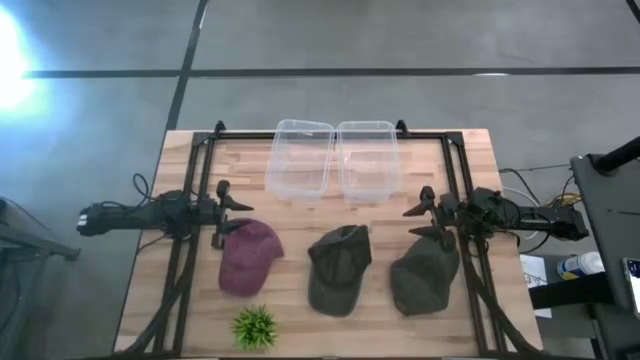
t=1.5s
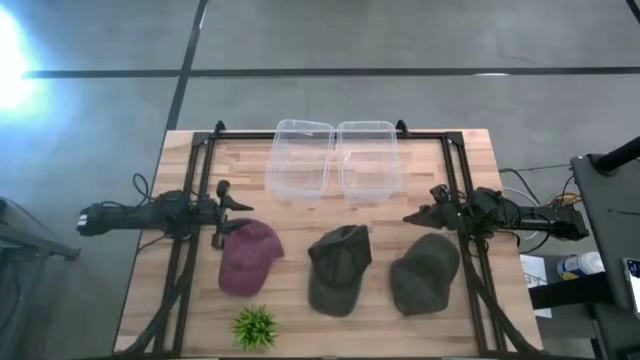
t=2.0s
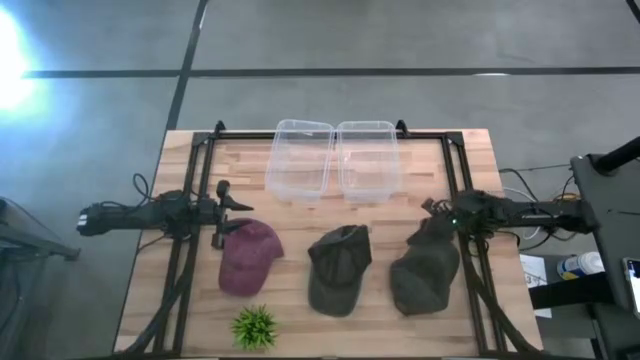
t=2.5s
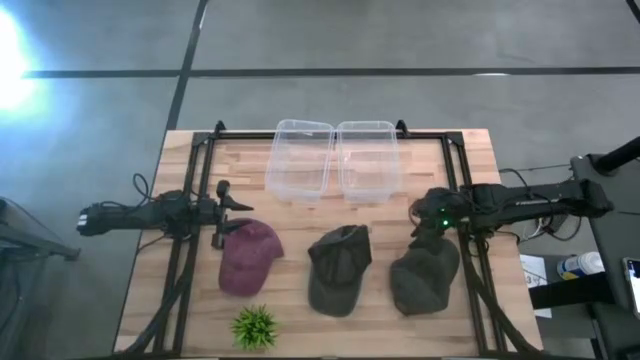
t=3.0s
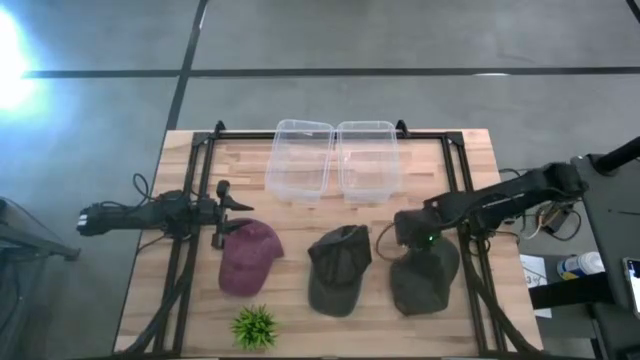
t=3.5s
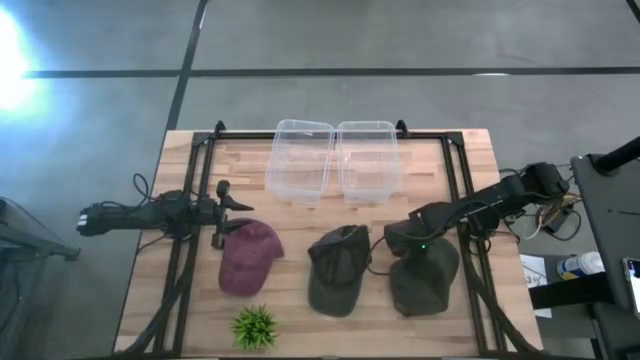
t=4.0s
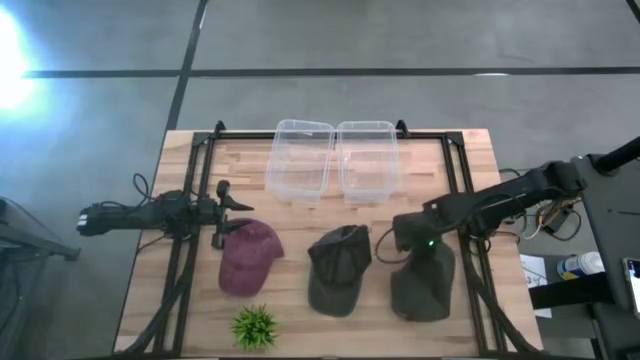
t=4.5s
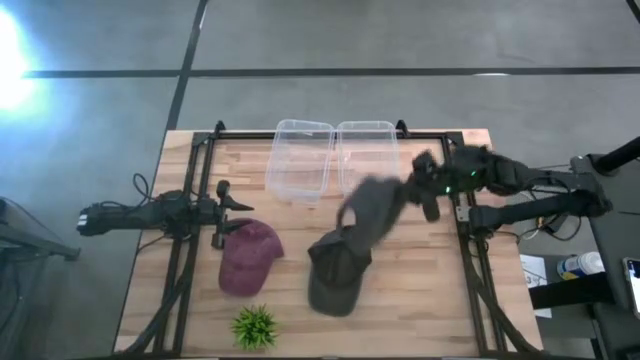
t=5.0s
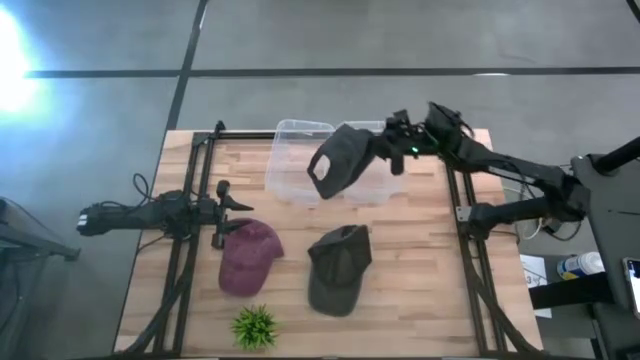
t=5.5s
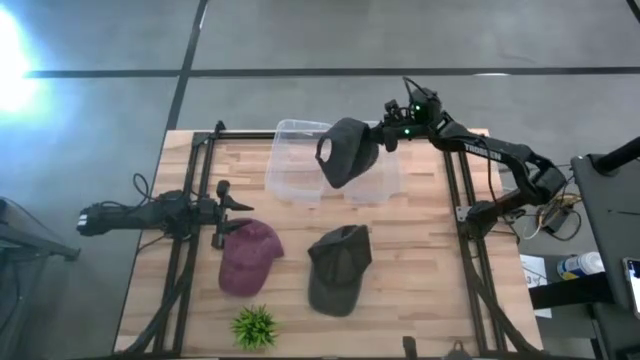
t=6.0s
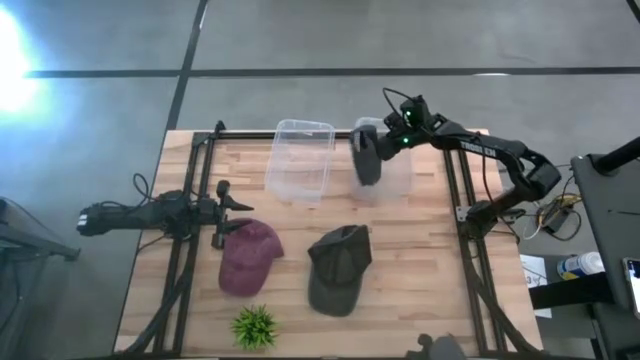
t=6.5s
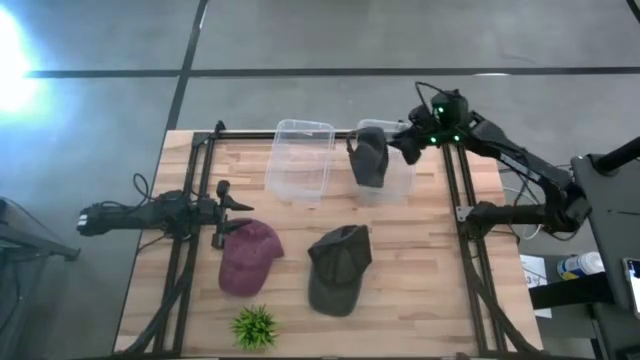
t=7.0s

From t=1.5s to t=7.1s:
Task: Pick & Place hat
Put the right black cap into the right transparent bin

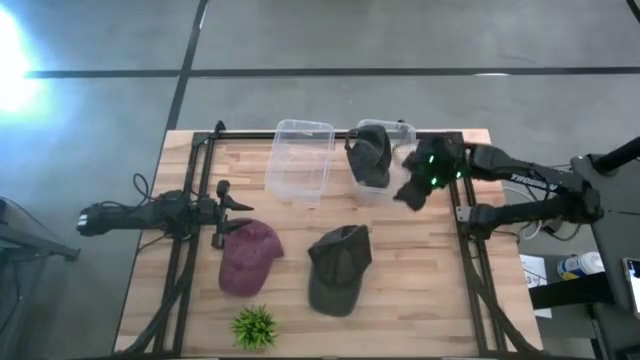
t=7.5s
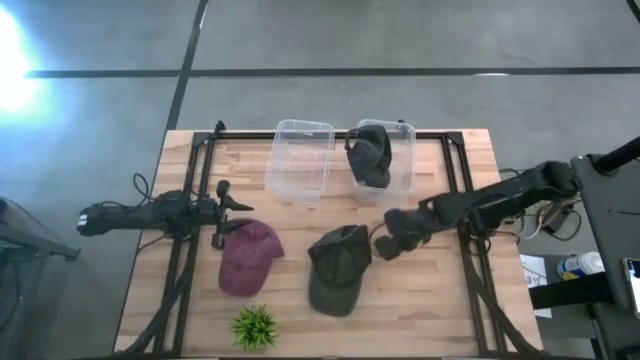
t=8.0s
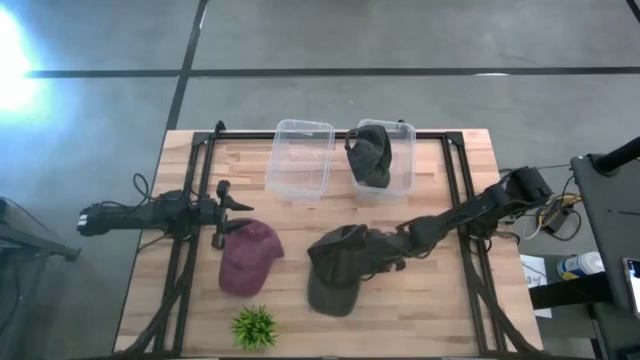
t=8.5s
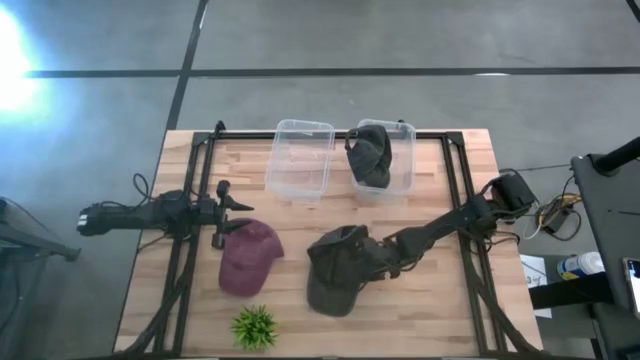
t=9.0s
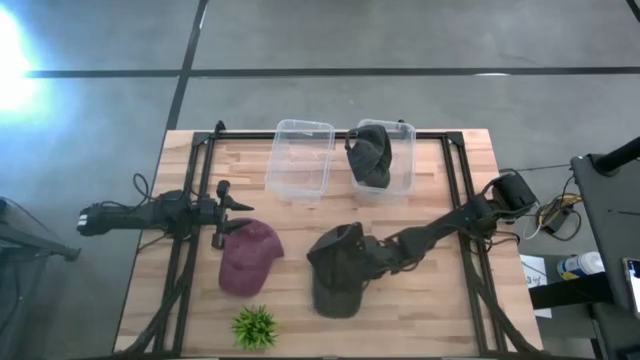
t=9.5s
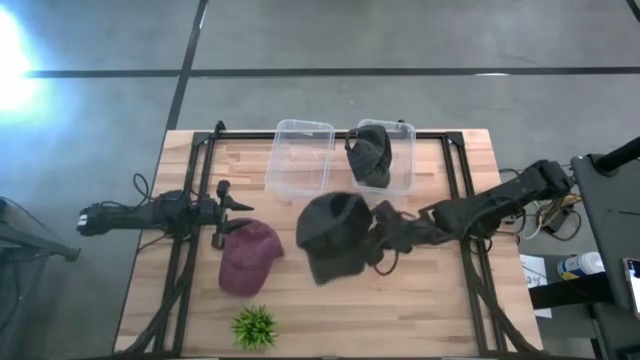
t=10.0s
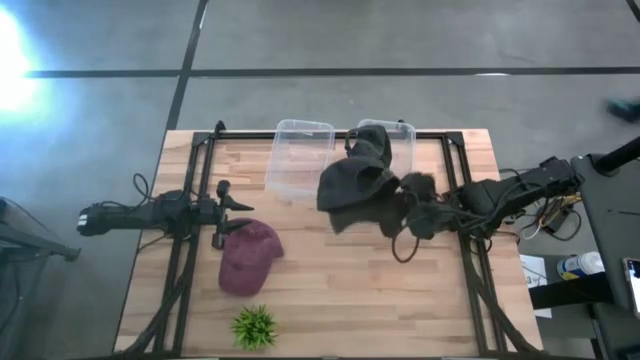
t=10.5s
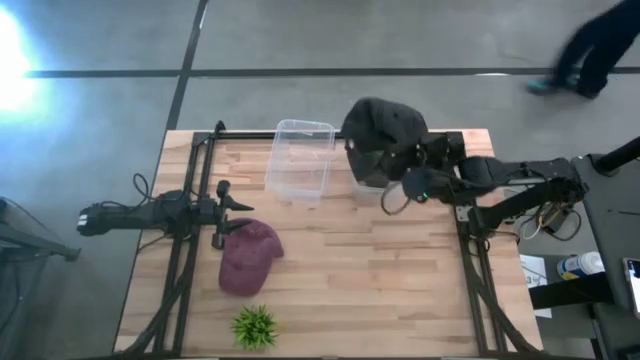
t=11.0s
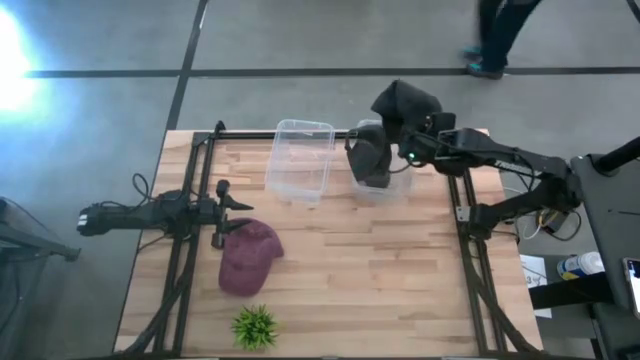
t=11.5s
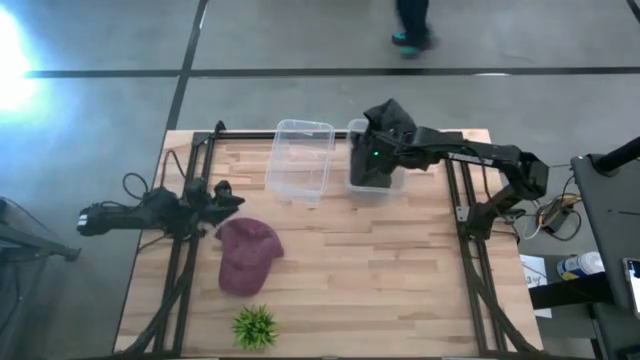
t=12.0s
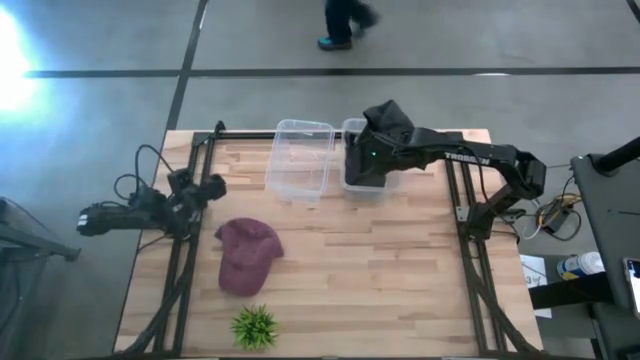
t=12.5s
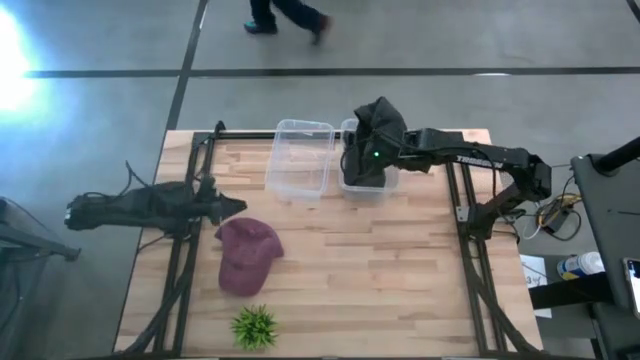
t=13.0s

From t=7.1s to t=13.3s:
Put the black cap into the right transparent bin

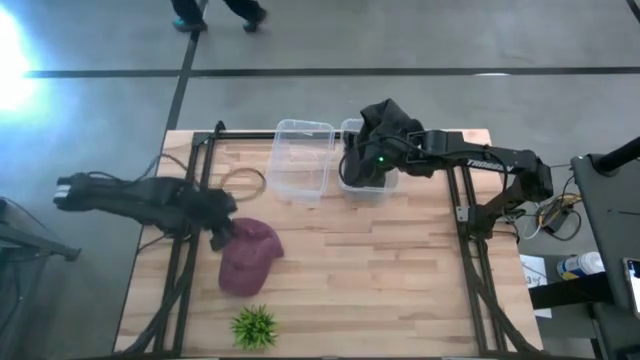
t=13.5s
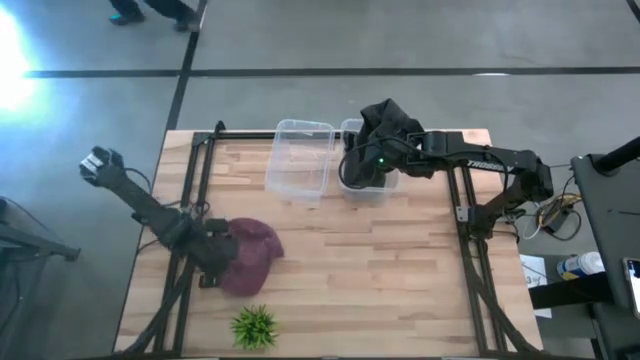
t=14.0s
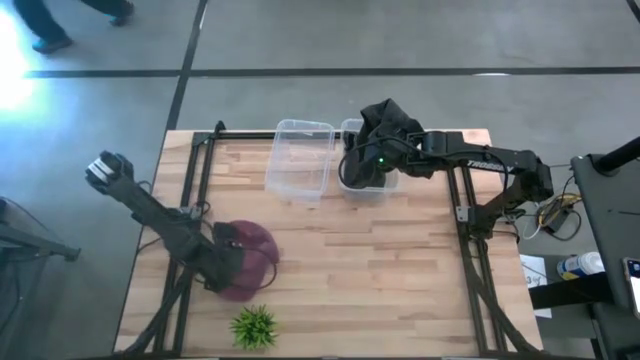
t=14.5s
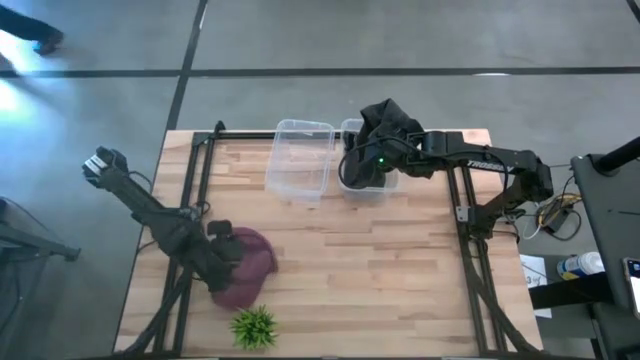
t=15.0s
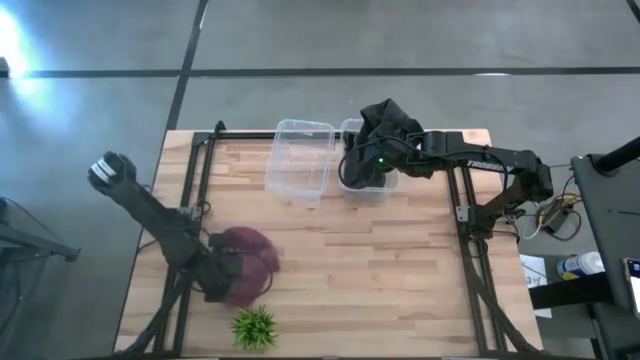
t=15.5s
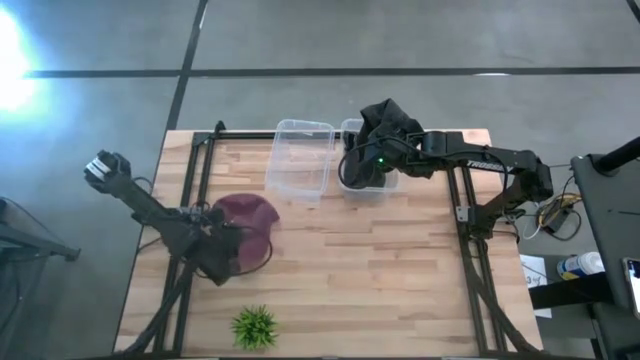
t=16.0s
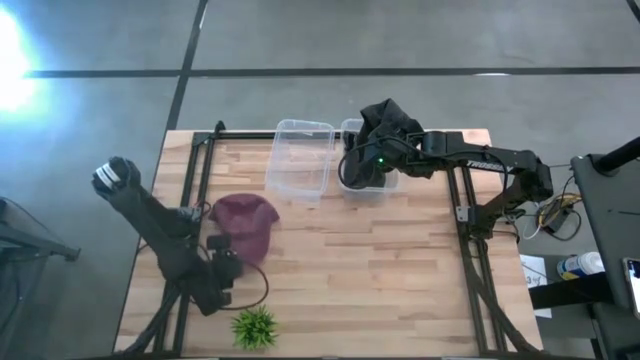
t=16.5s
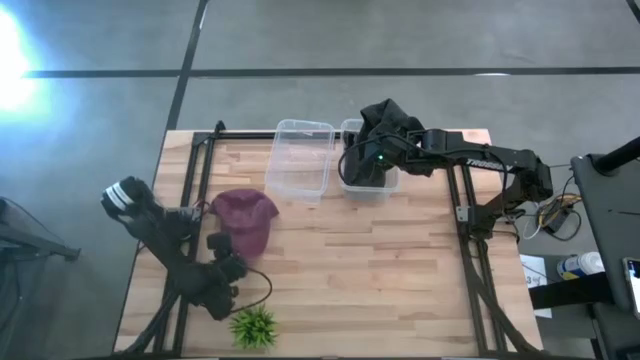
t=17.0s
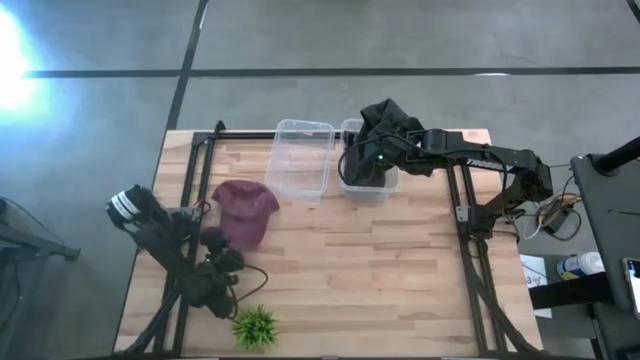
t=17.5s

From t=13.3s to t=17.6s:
Put the red cap into the left transparent bin

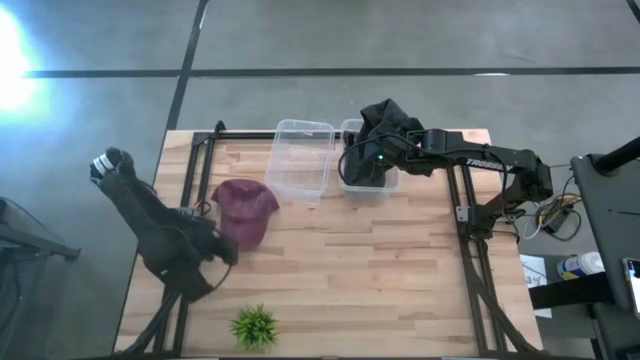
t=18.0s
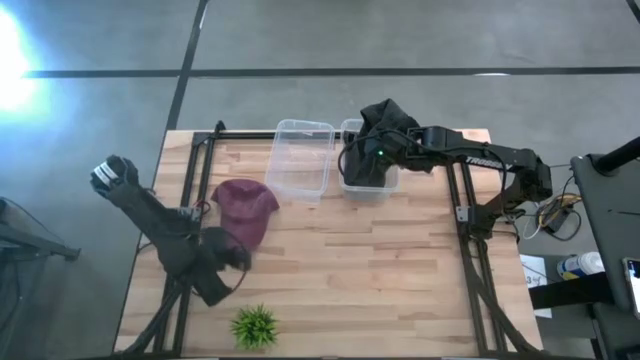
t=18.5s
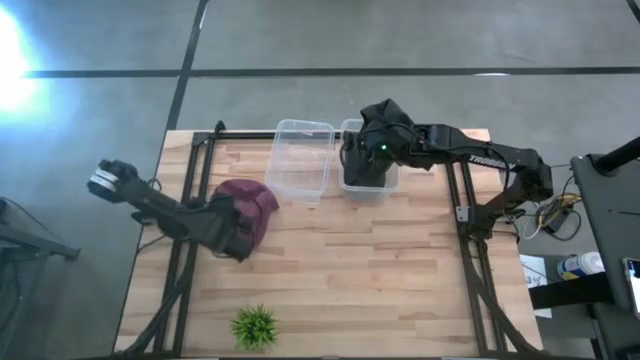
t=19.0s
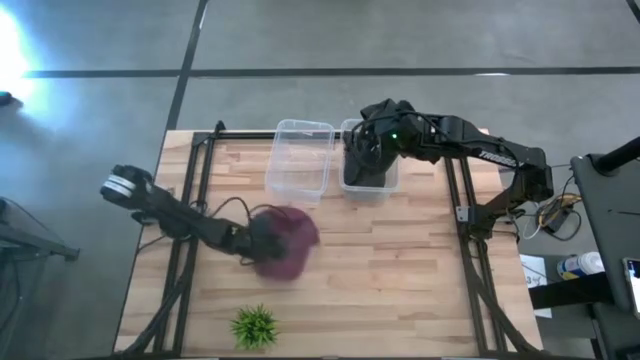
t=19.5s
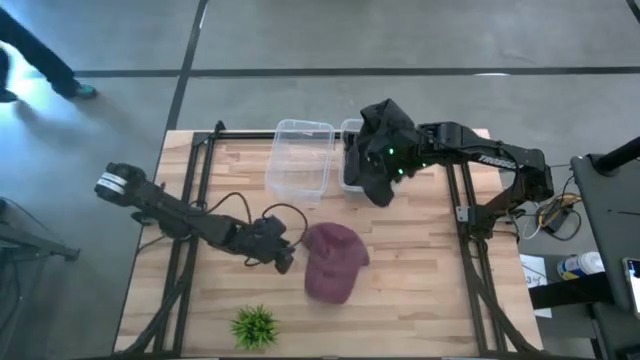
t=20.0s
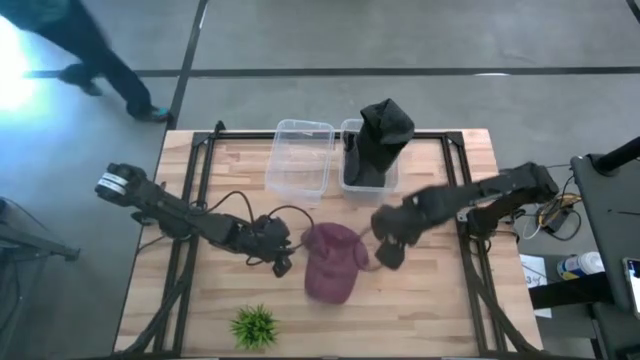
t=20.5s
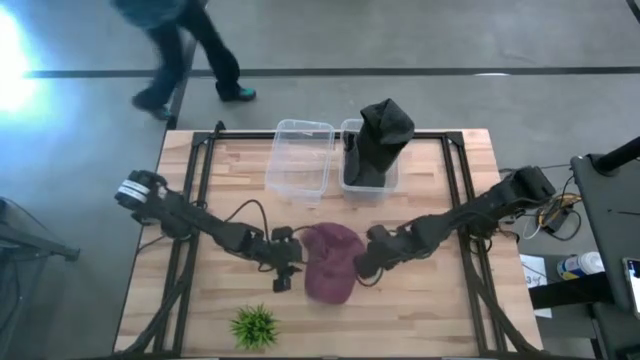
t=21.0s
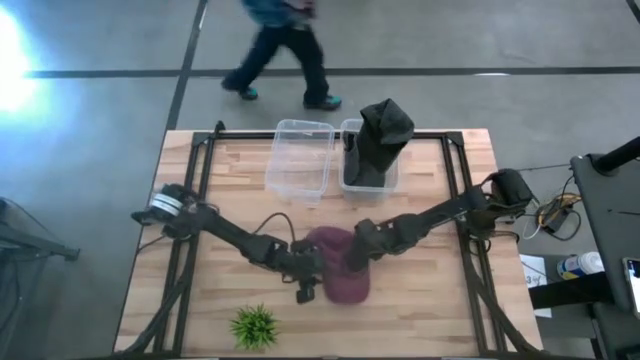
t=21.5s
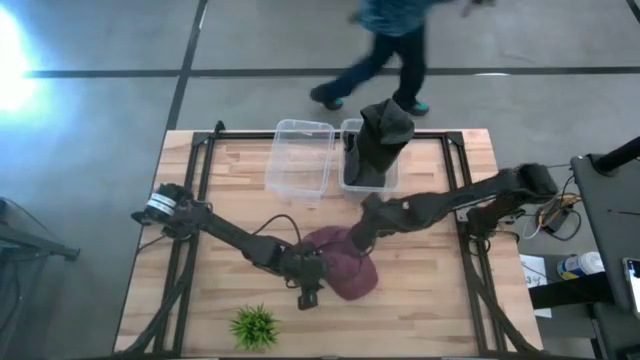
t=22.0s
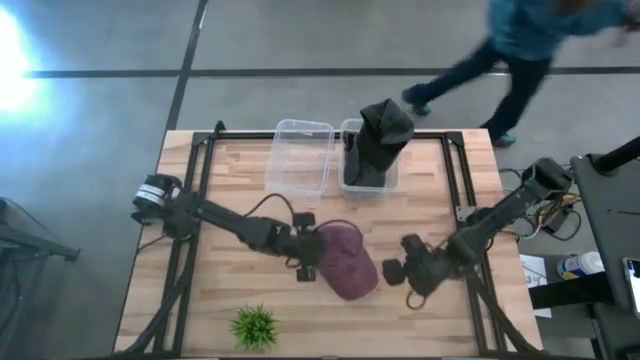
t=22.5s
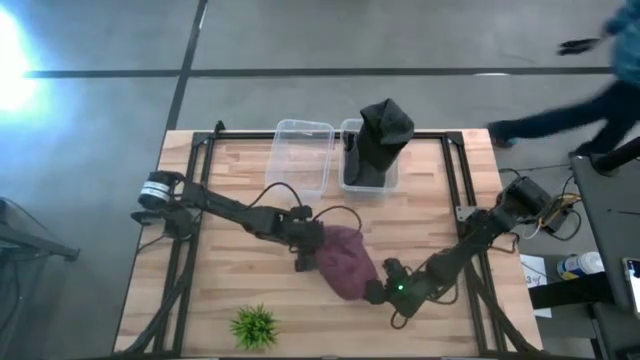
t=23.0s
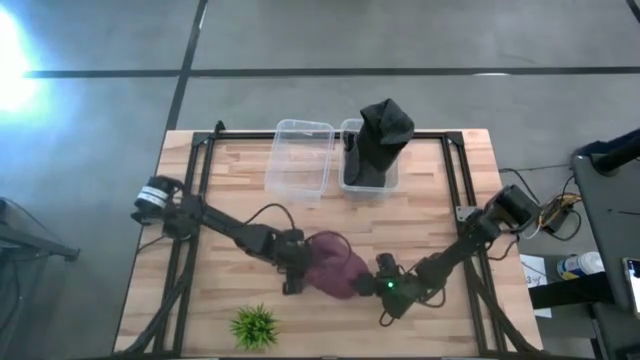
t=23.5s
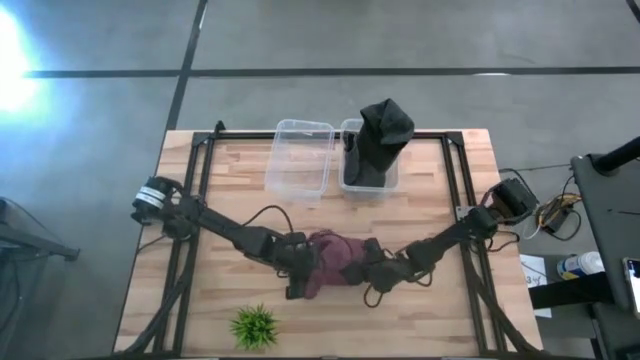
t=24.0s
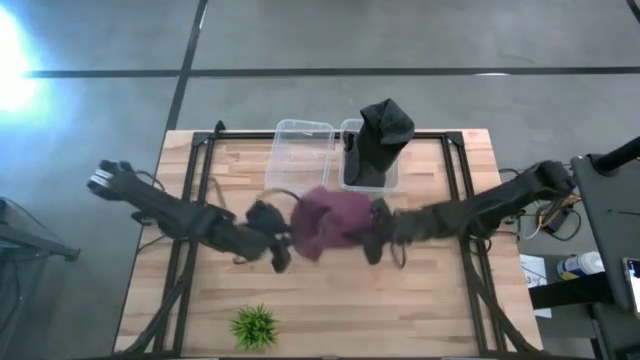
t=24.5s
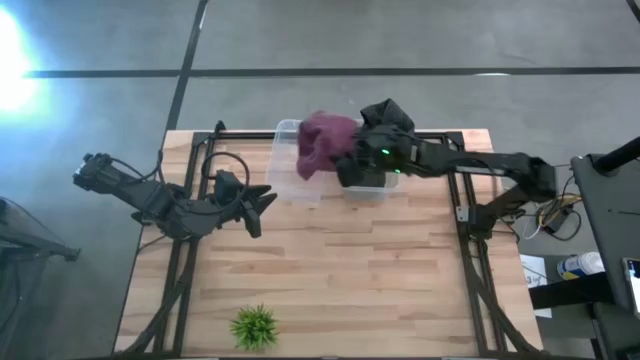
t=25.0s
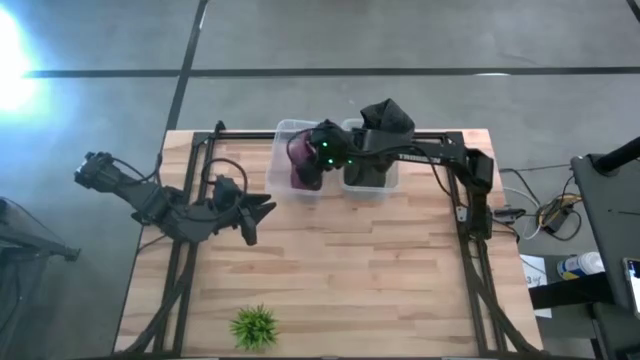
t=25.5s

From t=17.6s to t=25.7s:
Put the red cap into the left transparent bin
